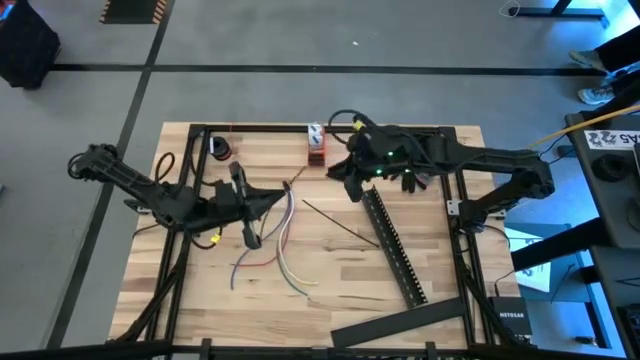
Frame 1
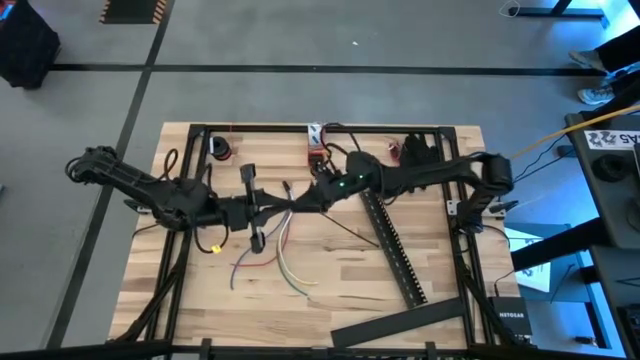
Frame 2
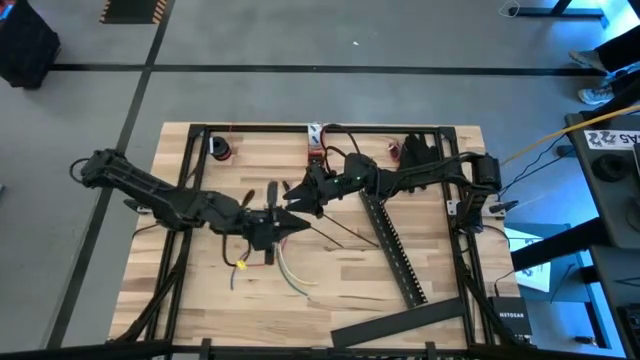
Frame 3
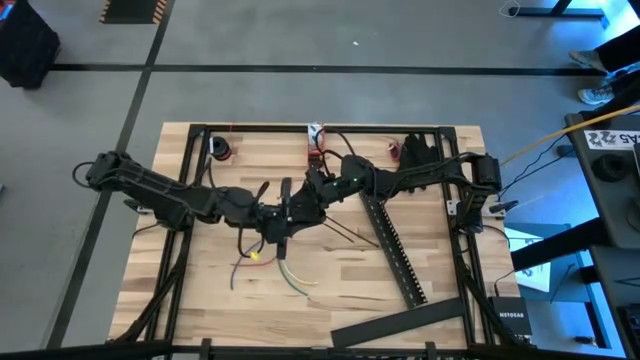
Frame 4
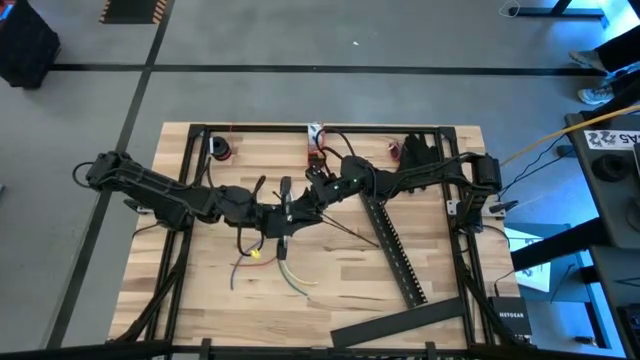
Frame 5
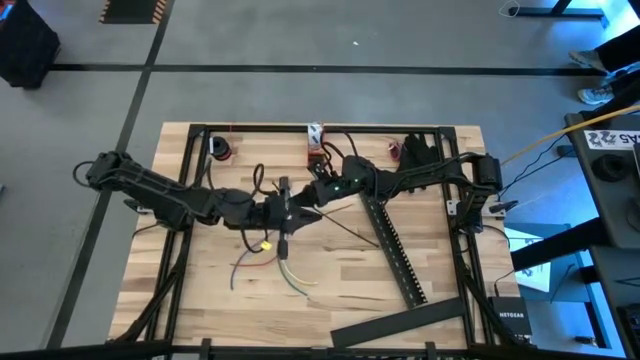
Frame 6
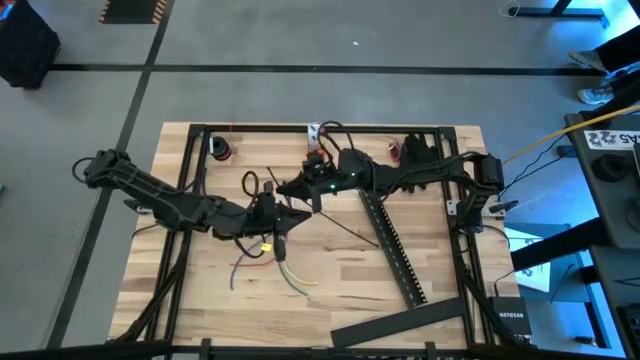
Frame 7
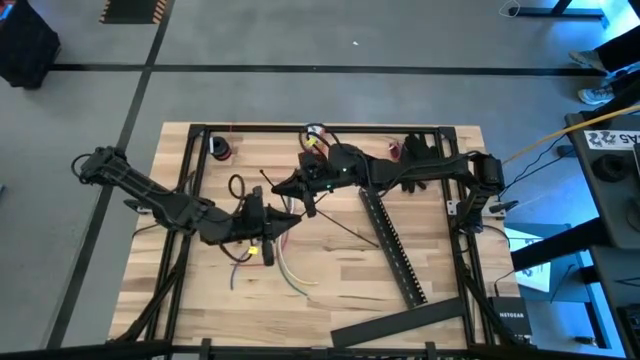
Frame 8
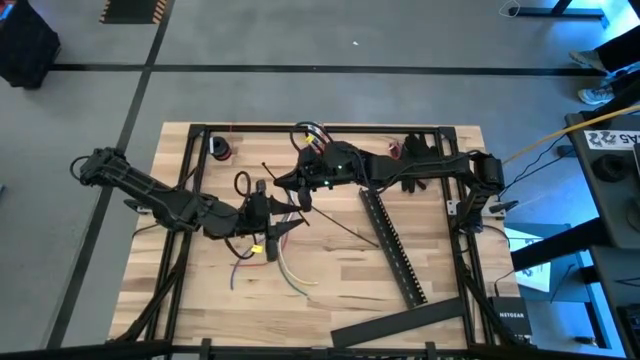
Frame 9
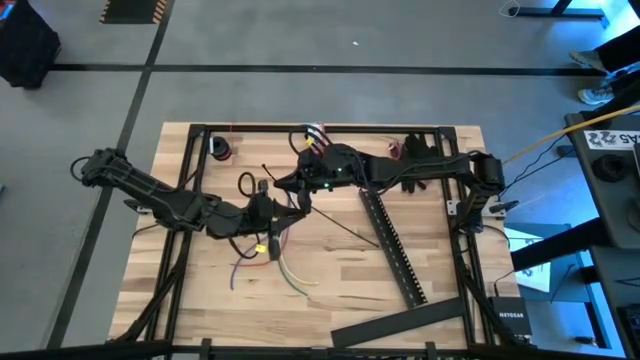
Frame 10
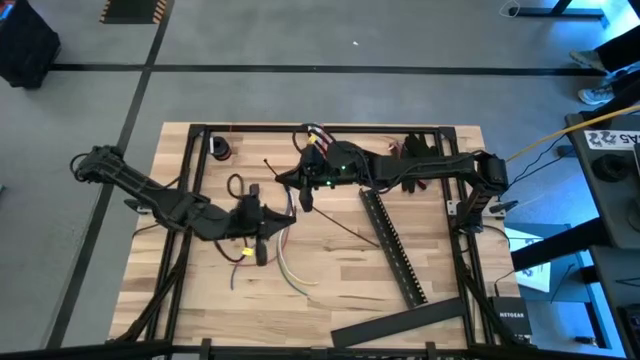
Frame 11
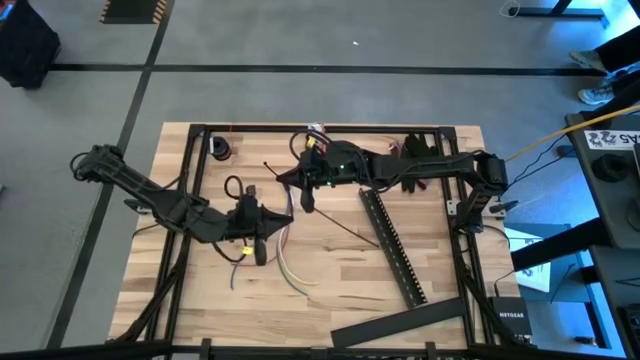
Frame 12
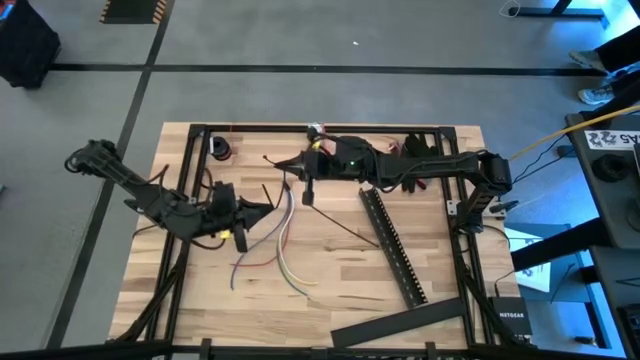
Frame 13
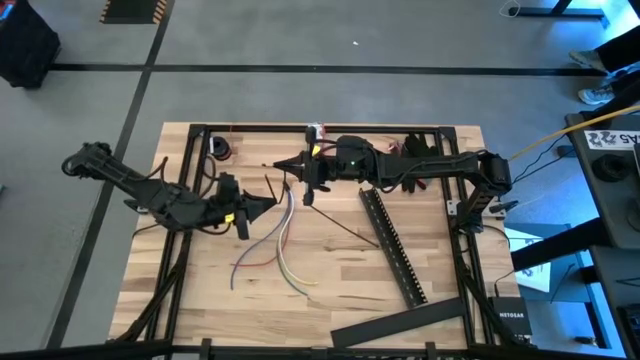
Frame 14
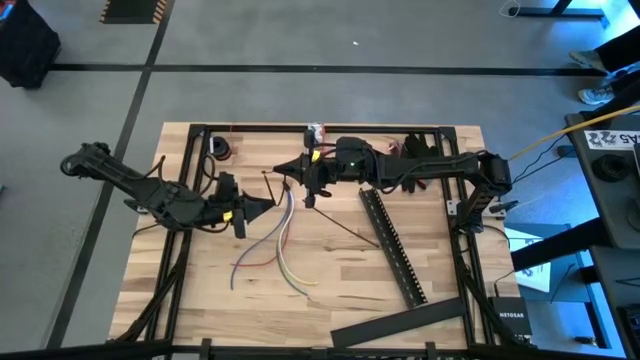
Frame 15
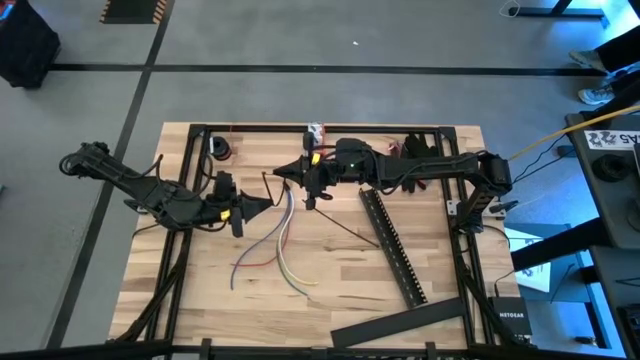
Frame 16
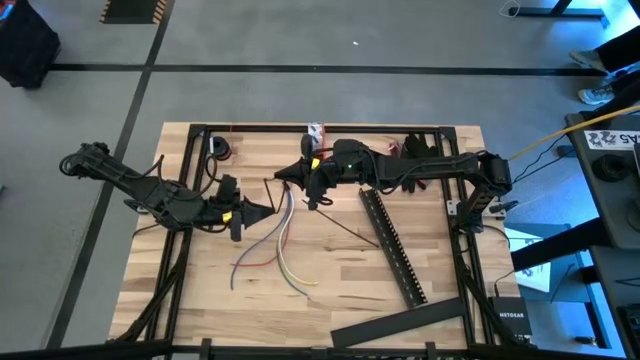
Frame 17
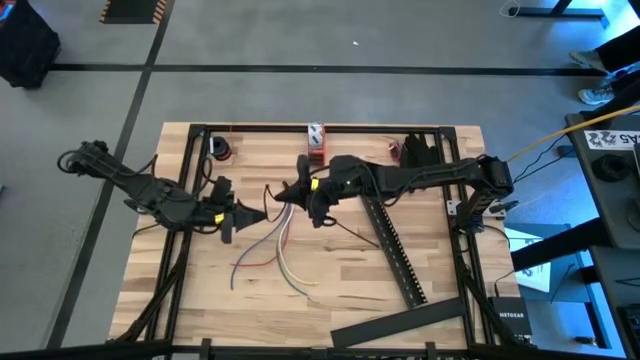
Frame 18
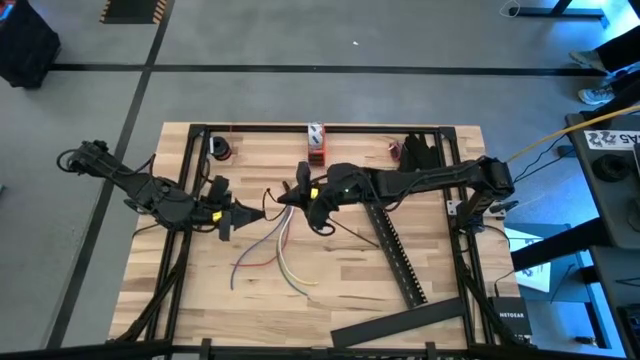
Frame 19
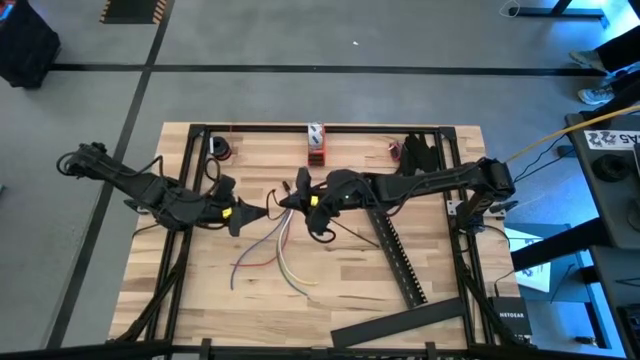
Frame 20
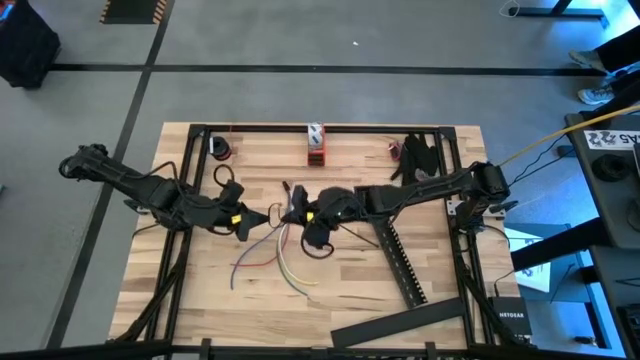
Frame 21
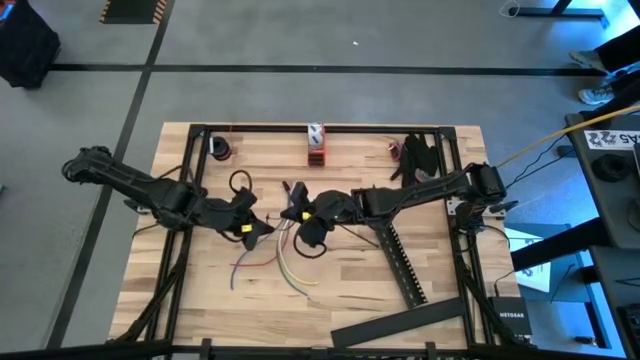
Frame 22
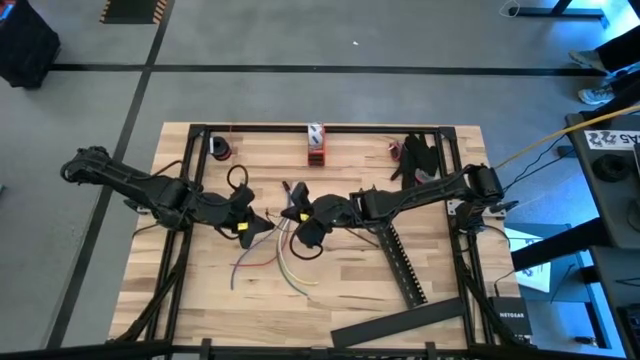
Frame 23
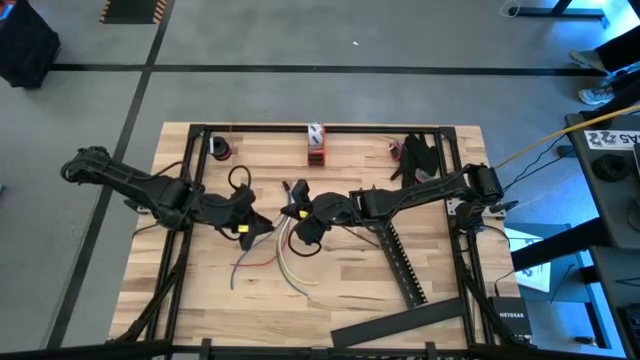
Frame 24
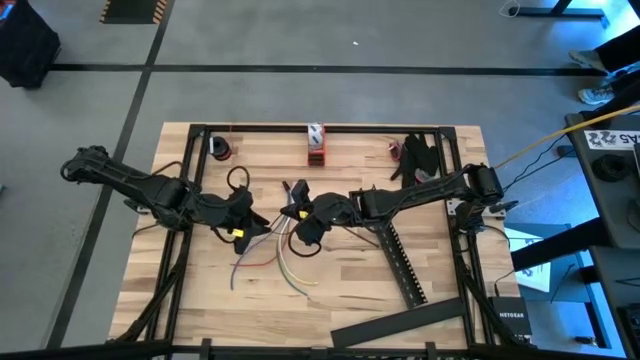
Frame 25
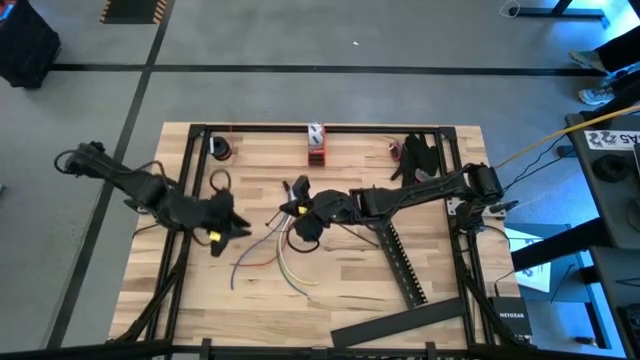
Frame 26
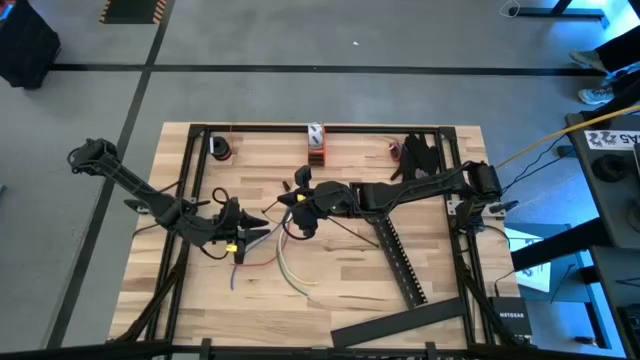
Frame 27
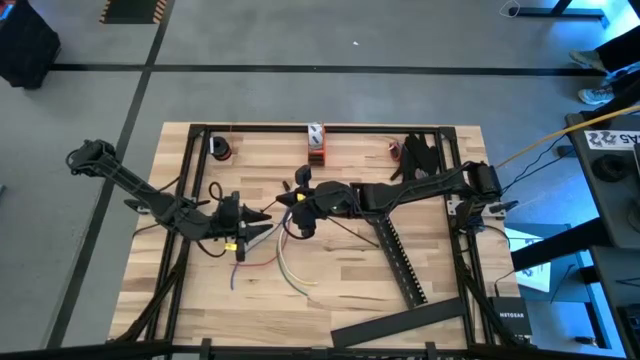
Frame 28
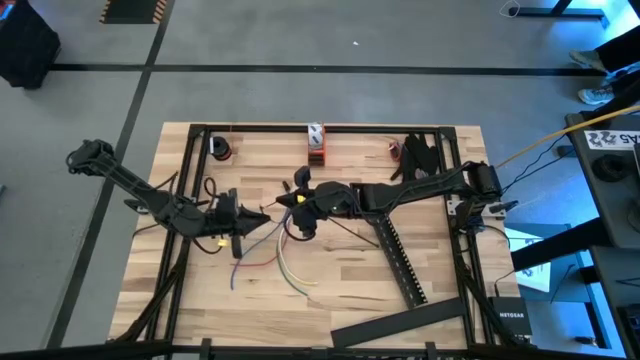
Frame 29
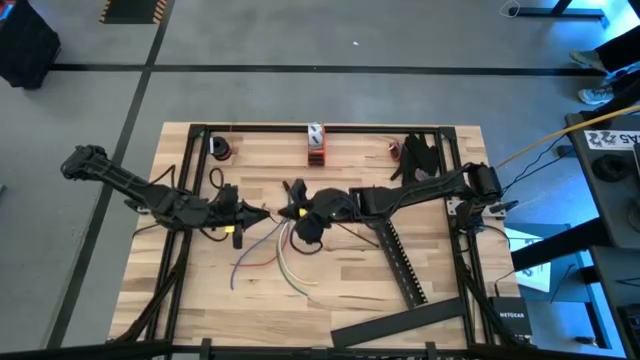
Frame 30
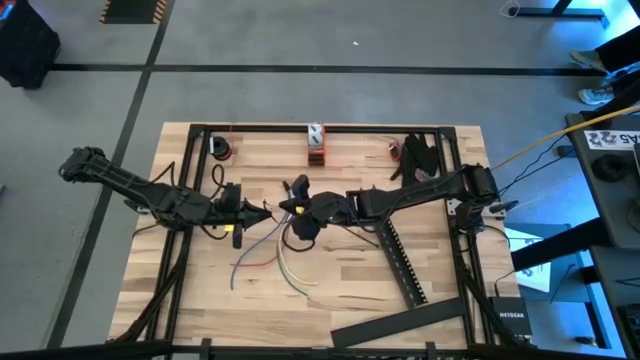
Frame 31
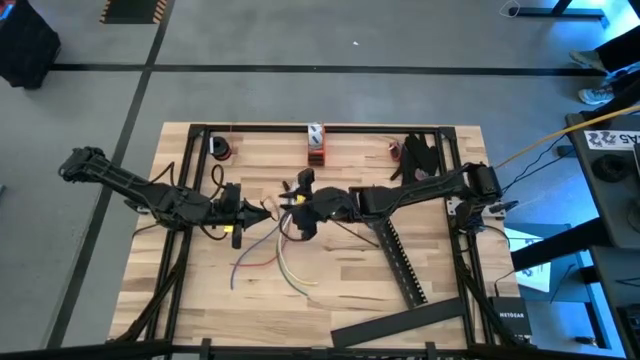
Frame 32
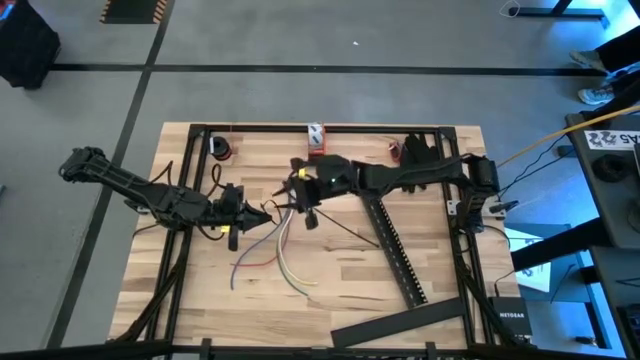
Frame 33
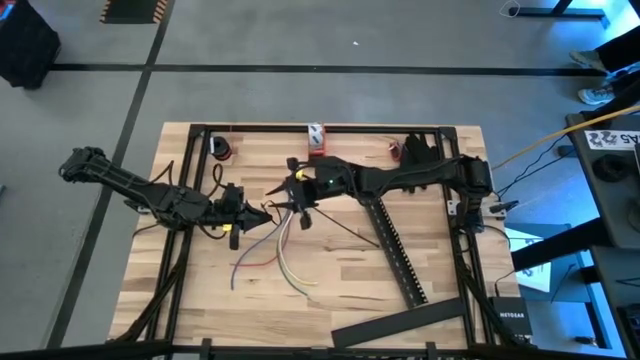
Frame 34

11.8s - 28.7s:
Task: Ziptie cables
Wrap the black zip tie on the cable

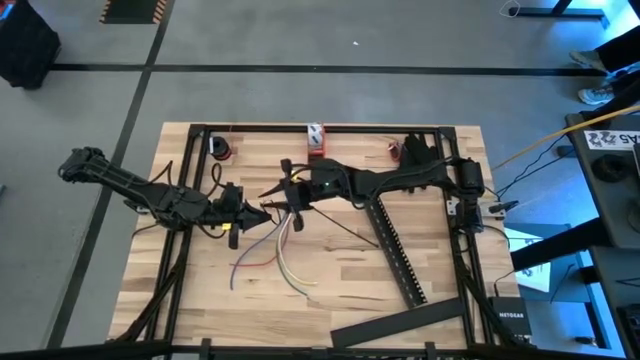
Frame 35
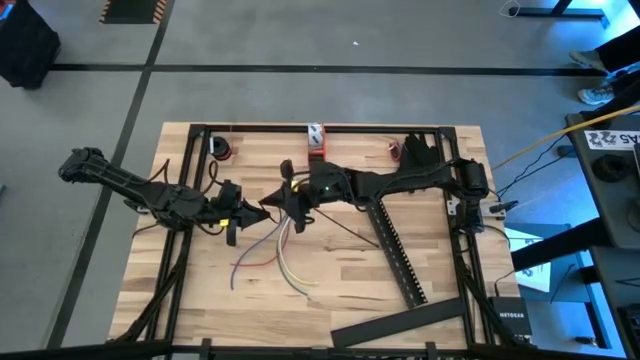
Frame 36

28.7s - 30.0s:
Wrap the black zip tie on the cable

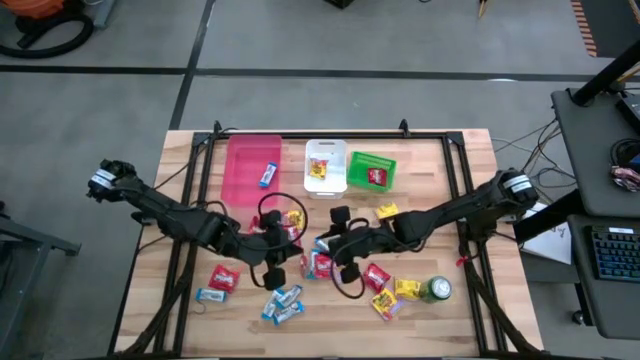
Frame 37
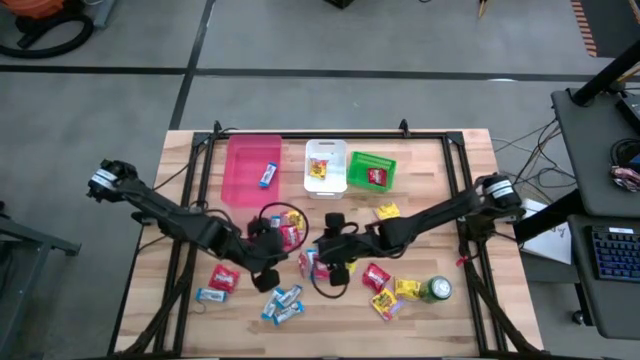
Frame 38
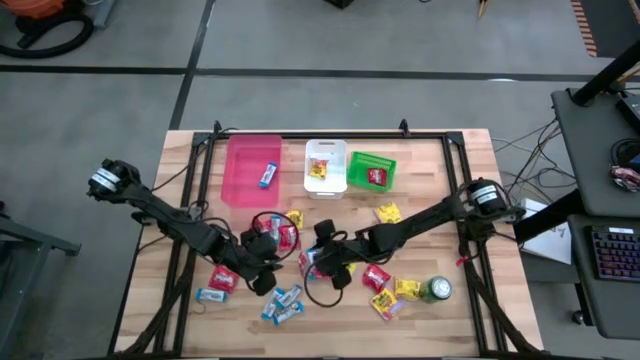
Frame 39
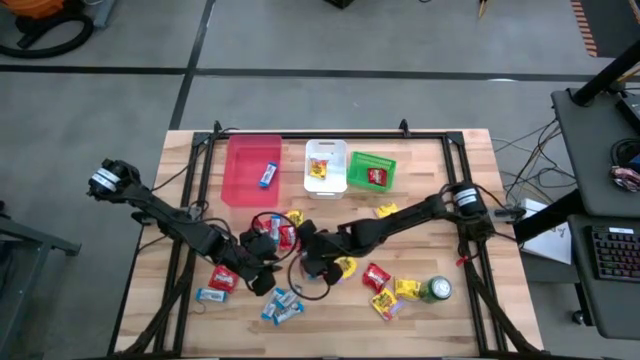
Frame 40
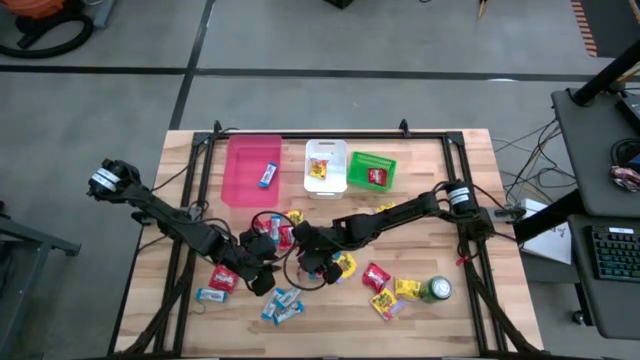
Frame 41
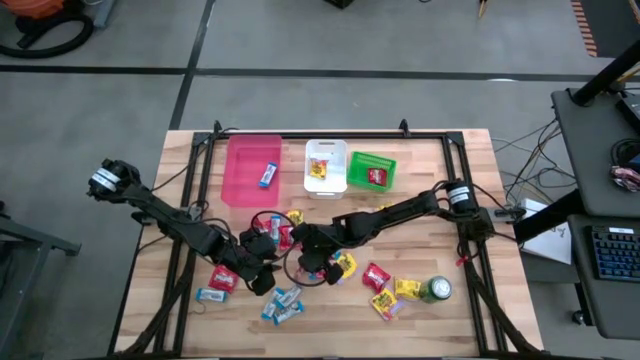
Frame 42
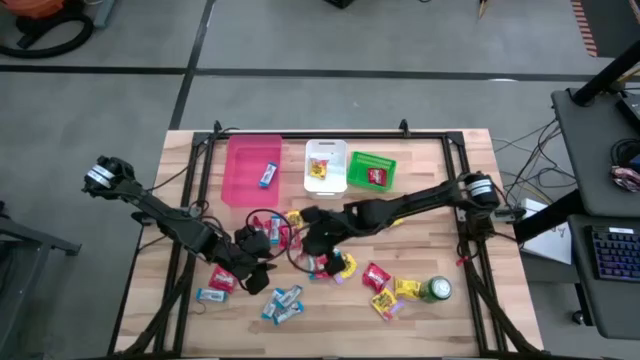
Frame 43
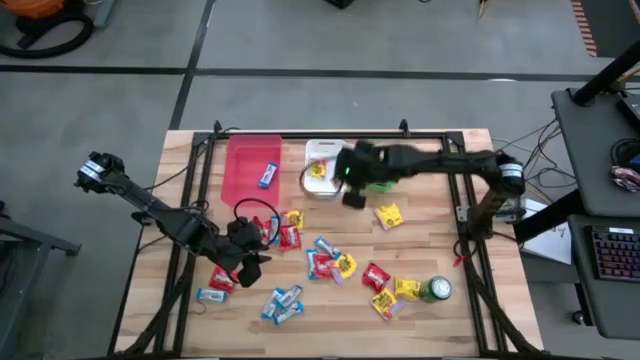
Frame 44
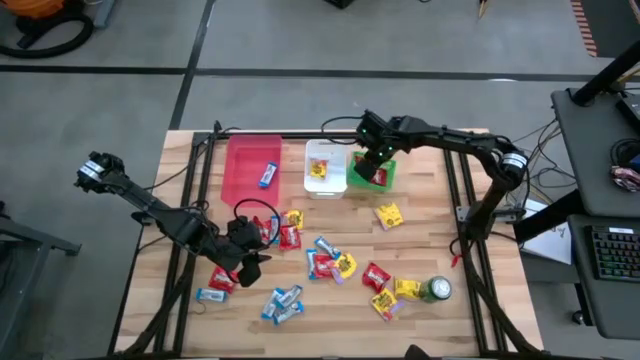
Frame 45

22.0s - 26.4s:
Task: Sort candy
Put the red candy into the green bin
